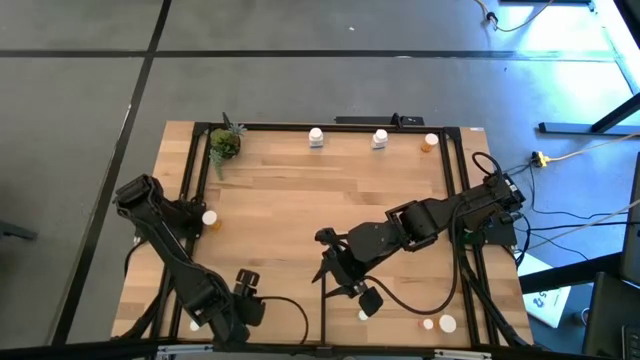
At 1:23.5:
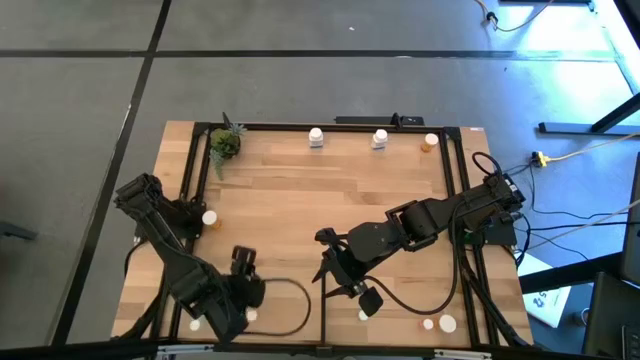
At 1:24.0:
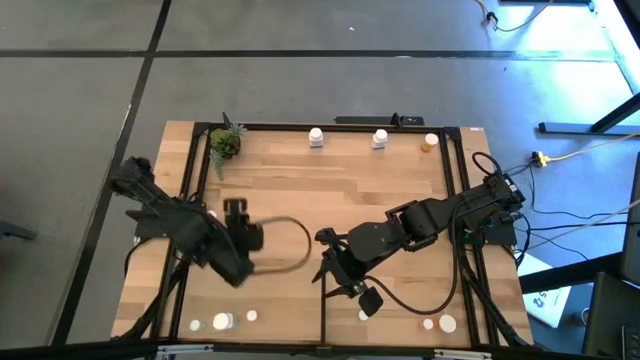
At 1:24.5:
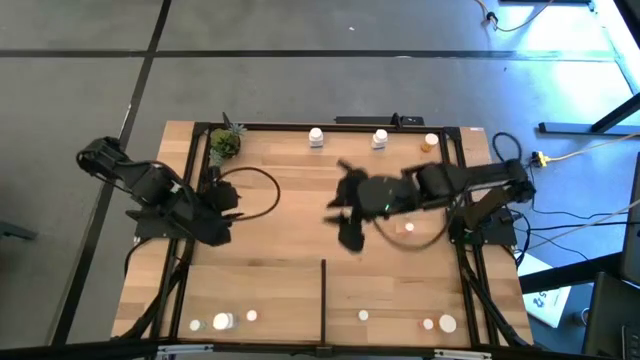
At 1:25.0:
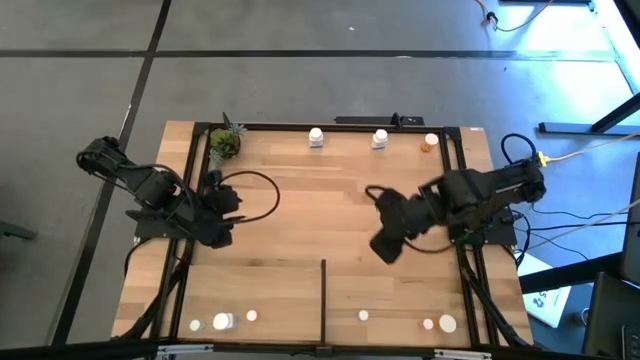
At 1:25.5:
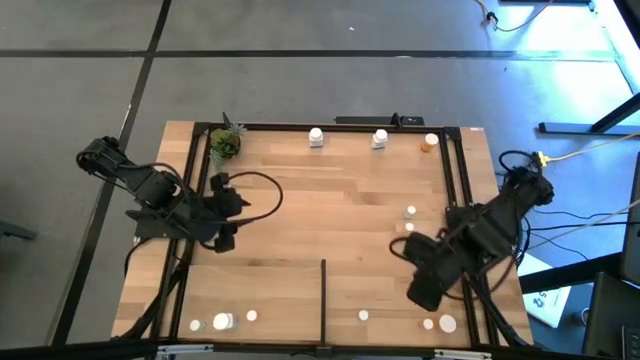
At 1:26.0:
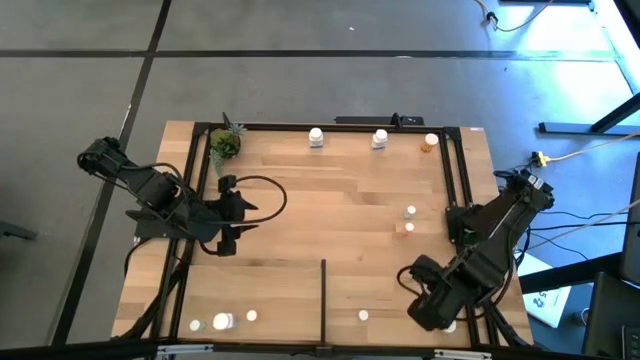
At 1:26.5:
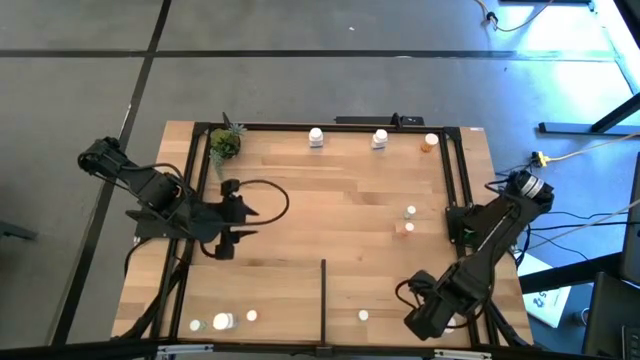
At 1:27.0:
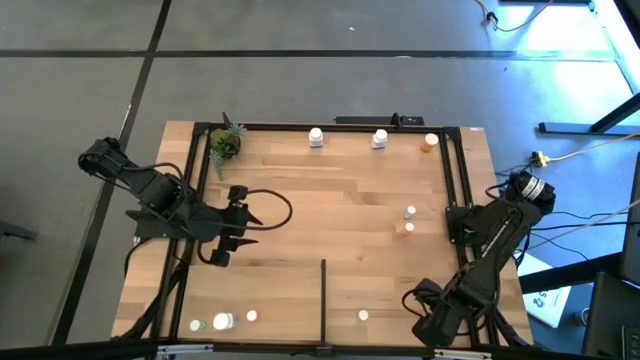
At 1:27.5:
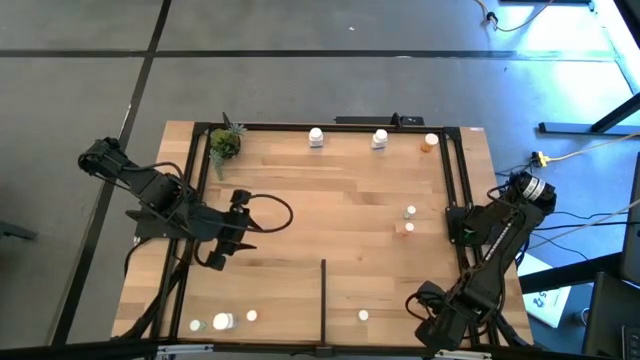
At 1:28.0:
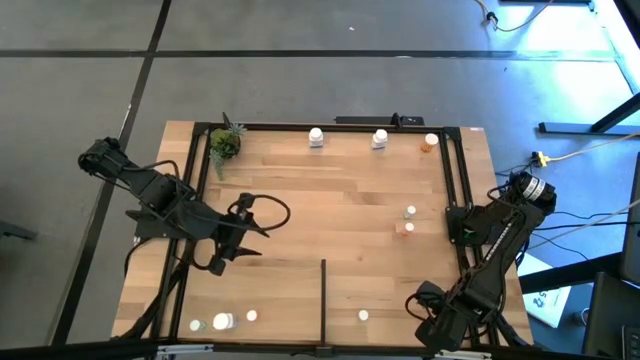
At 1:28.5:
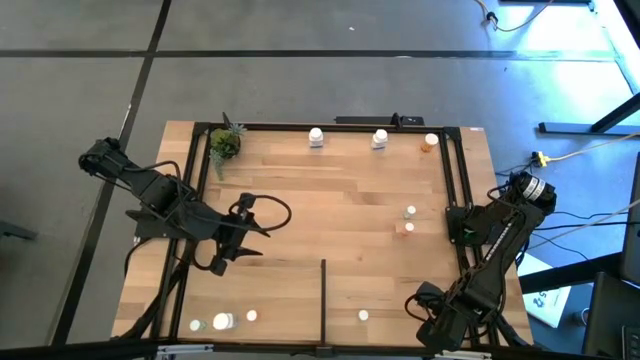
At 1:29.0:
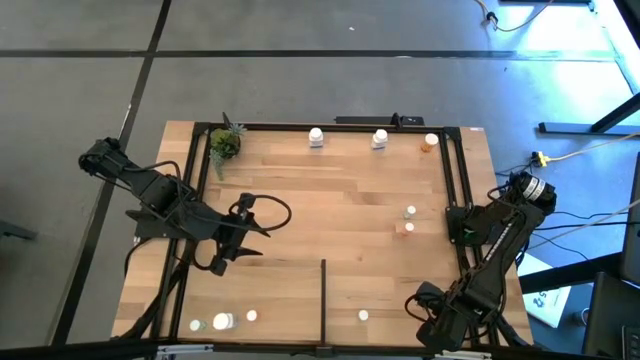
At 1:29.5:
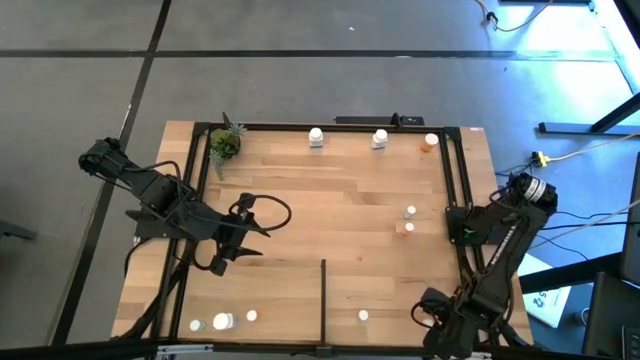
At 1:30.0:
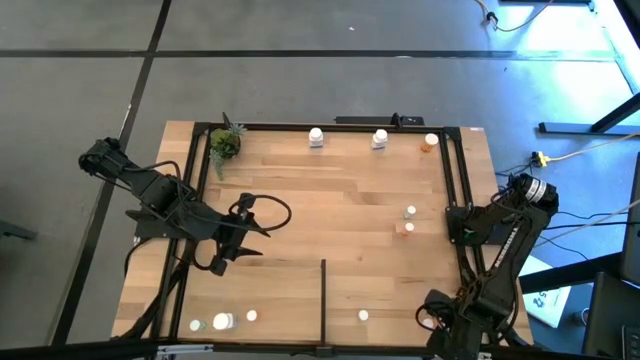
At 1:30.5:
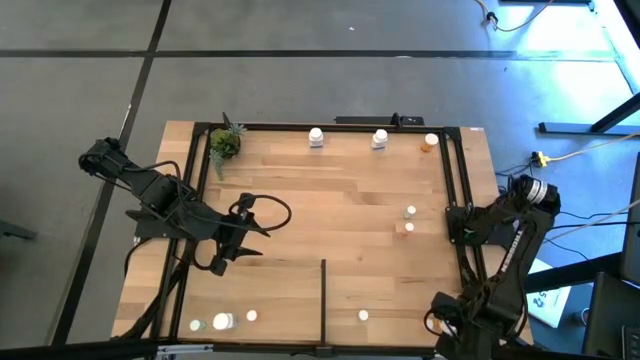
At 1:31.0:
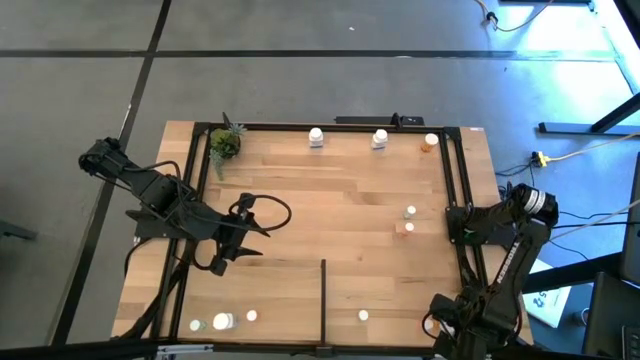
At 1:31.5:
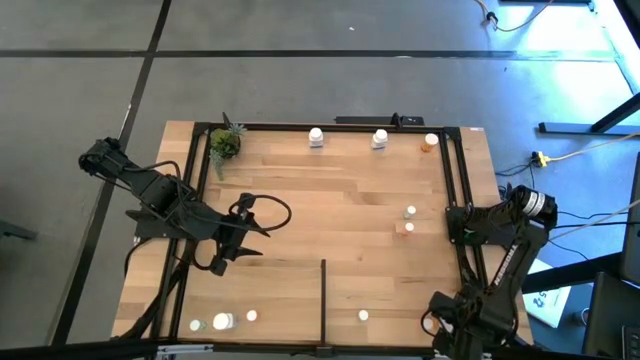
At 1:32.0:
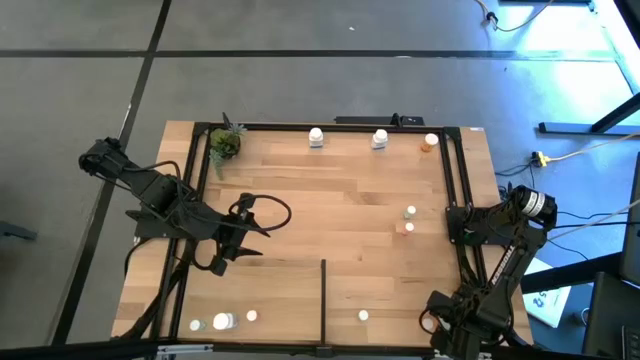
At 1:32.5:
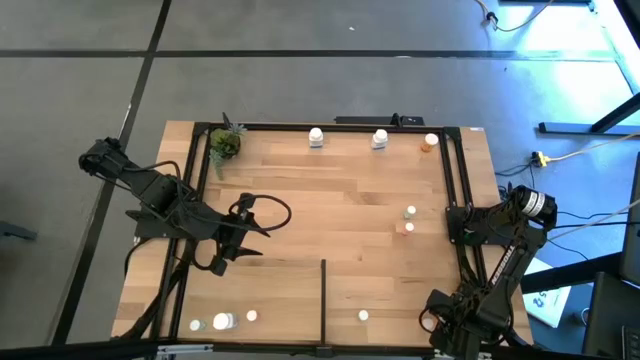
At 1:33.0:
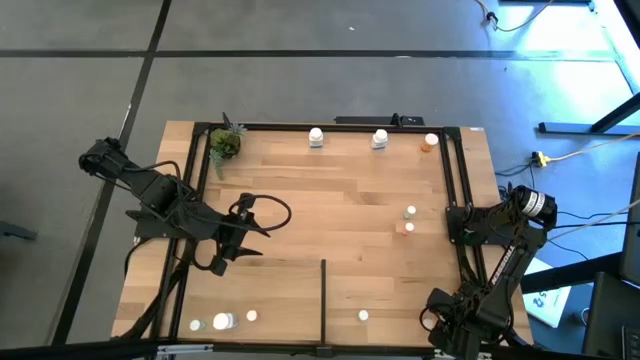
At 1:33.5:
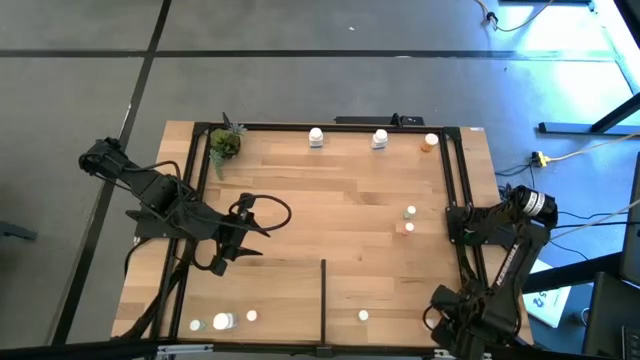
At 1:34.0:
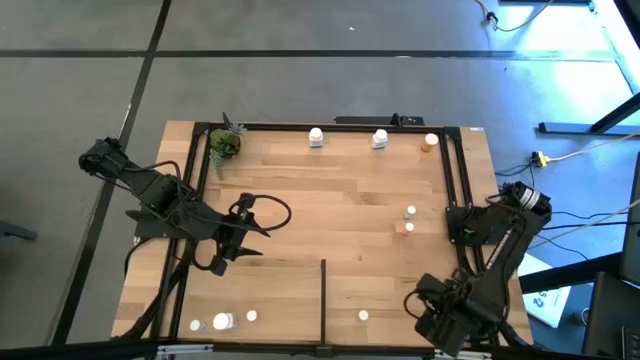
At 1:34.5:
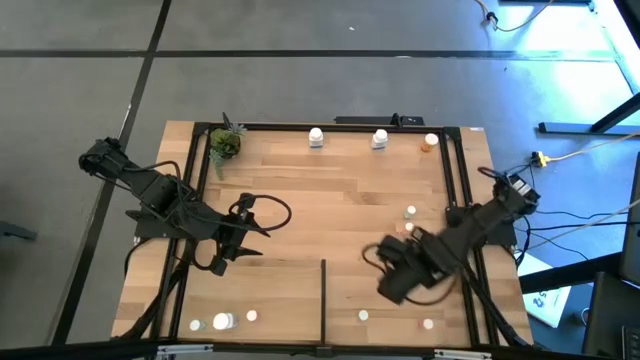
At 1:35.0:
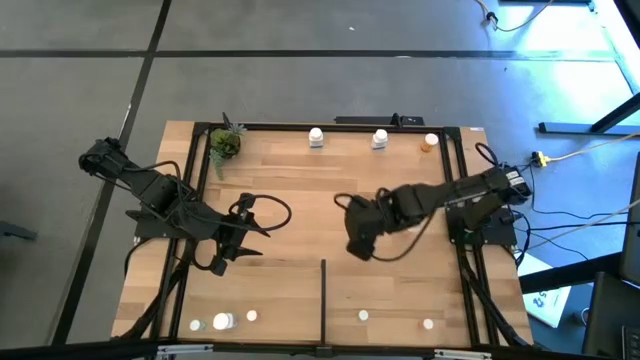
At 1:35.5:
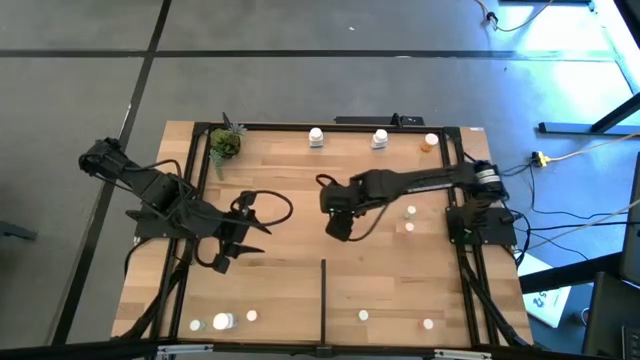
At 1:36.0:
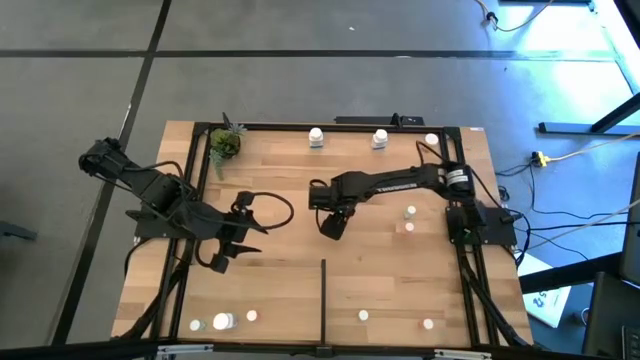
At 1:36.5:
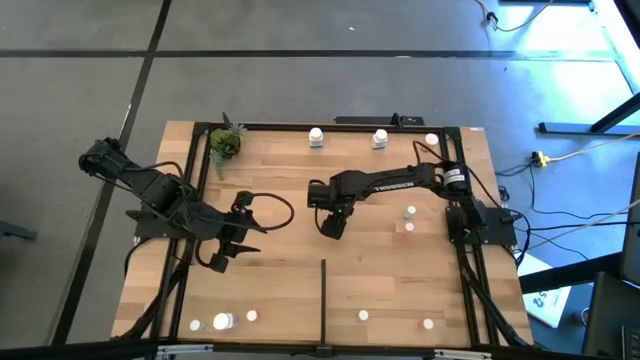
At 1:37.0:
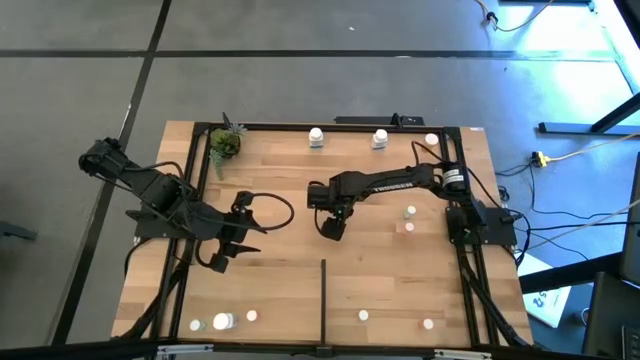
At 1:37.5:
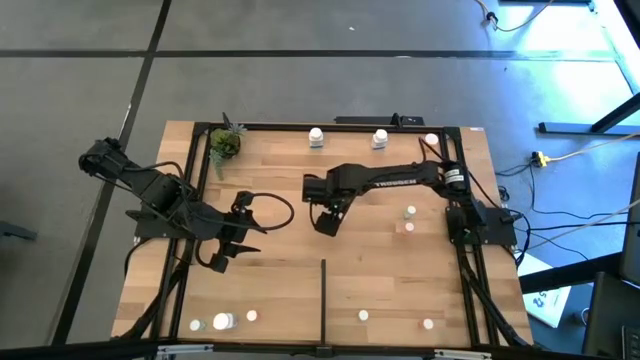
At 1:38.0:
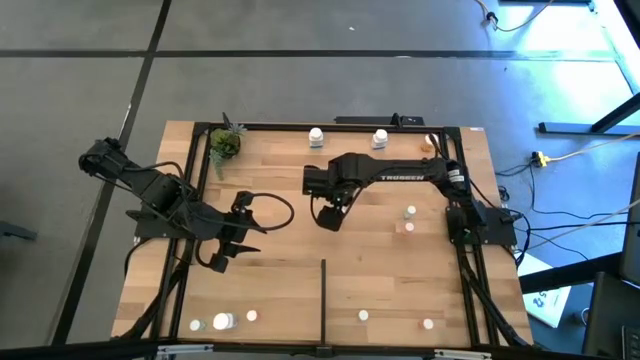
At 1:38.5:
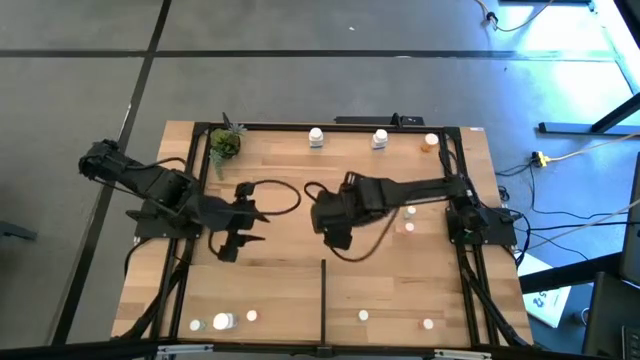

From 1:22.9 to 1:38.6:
Task: Pick and place medicine bottles onto shelf by color
Put the bottom right orange pill bottle on the shelf

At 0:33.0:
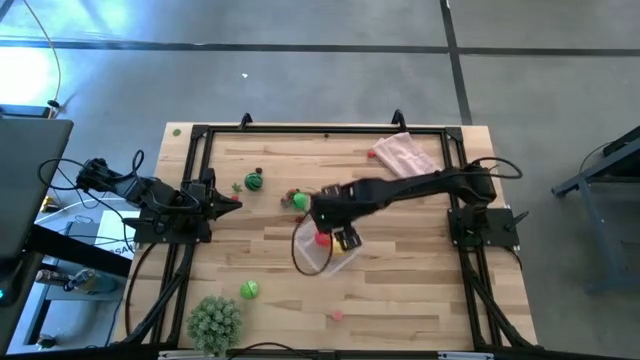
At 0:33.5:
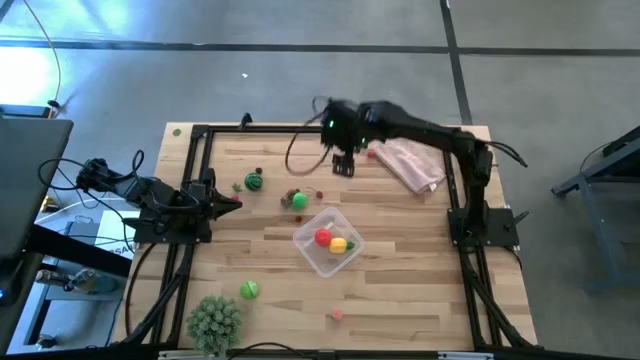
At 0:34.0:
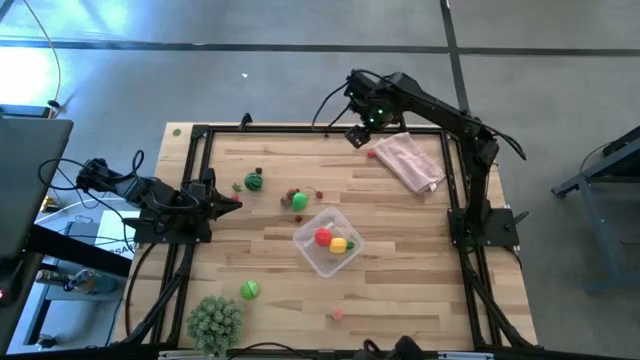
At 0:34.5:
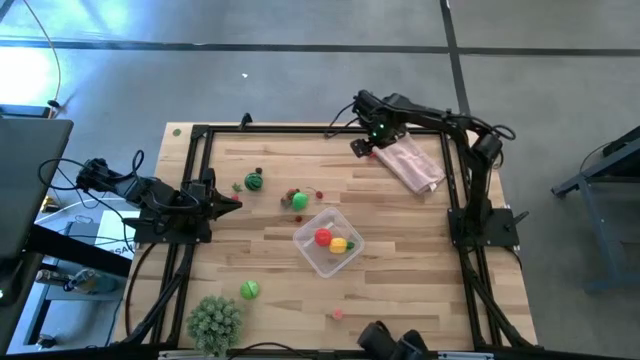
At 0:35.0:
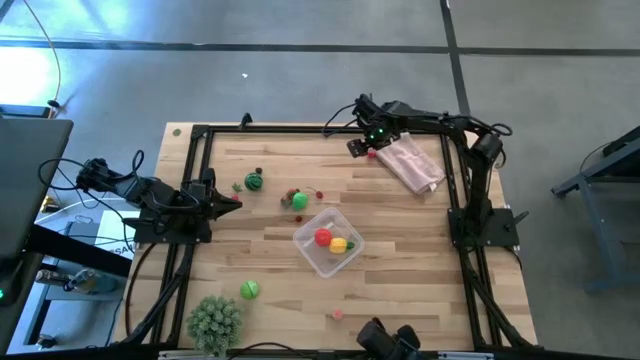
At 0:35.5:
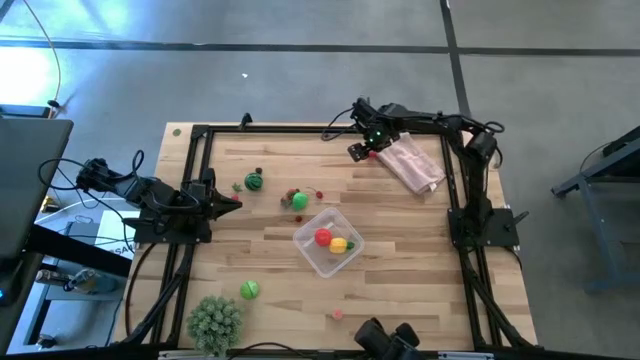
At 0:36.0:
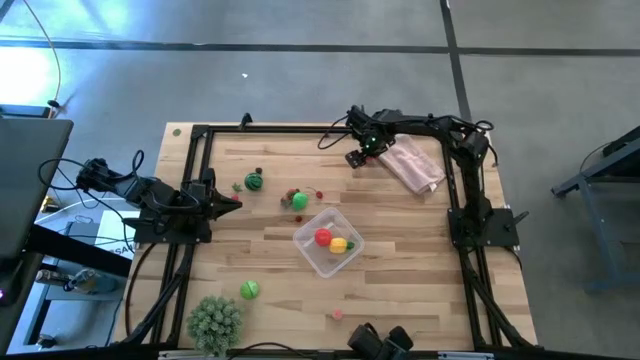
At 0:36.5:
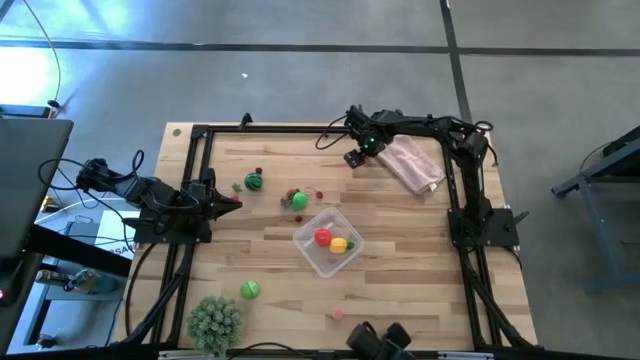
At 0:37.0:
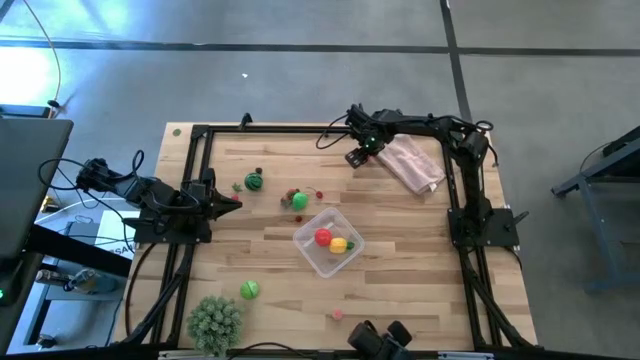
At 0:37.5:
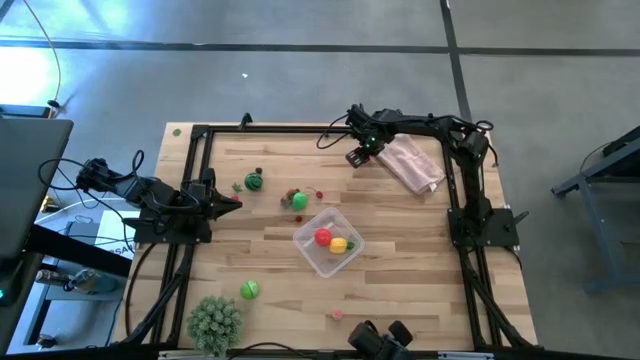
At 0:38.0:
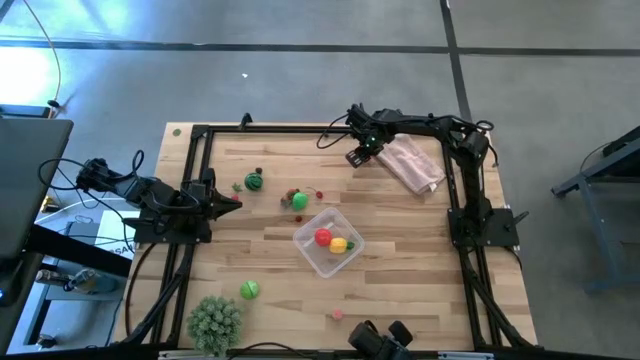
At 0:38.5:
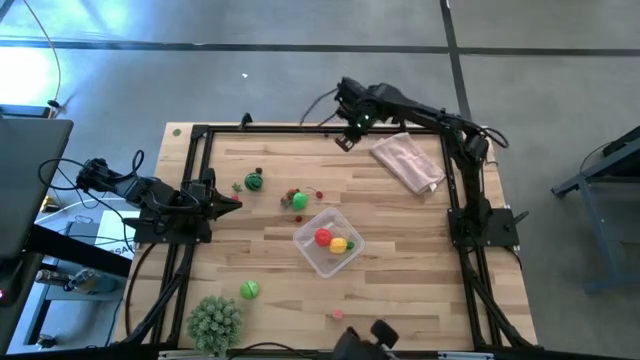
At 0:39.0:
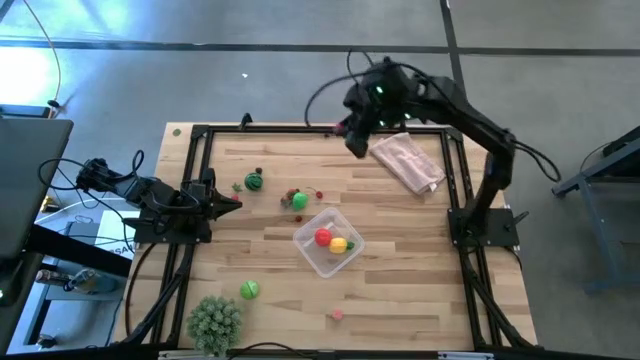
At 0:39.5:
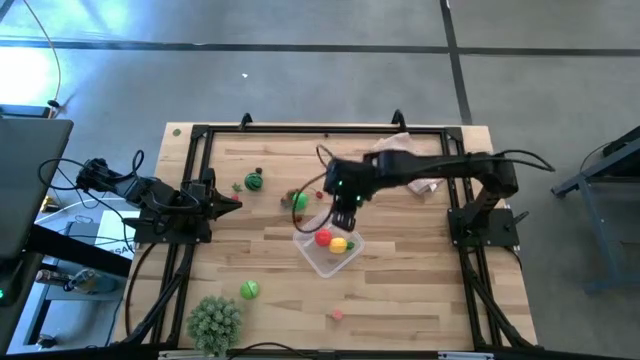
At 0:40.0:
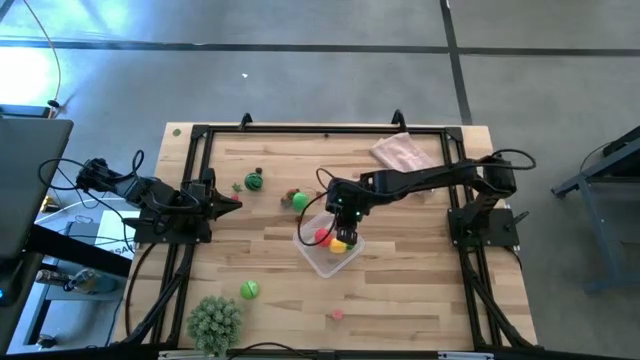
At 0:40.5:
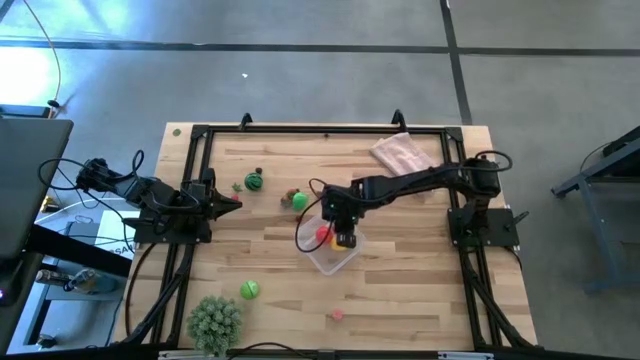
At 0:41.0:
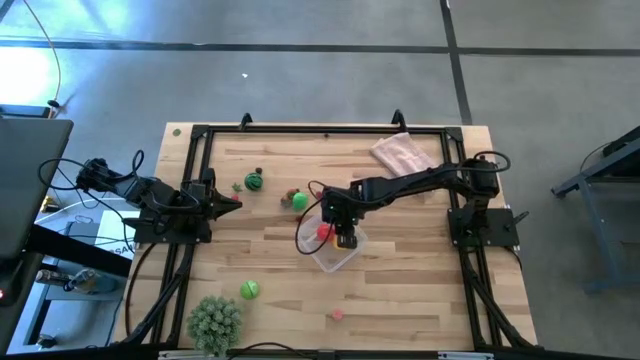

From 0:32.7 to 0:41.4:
Task: Pick and placing Produce into tupperware
Put the red cherry into the transparent container
